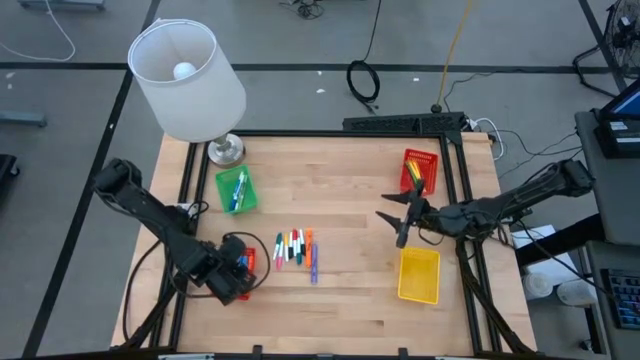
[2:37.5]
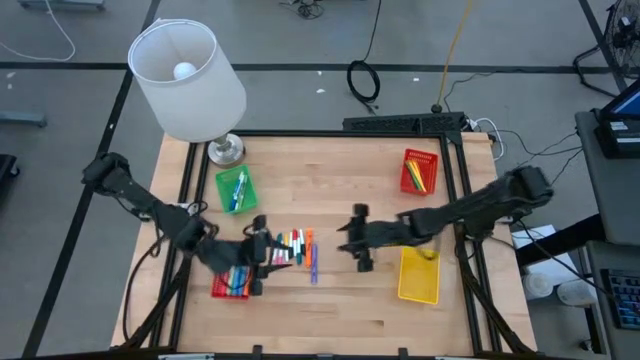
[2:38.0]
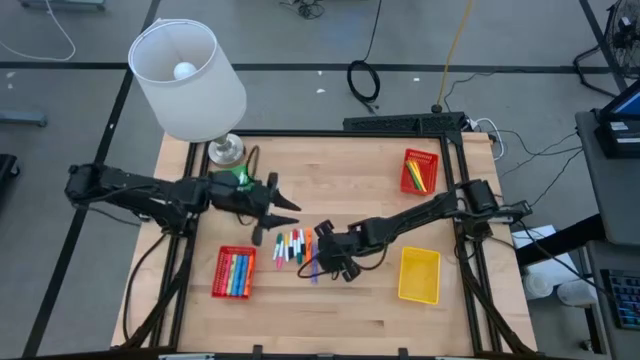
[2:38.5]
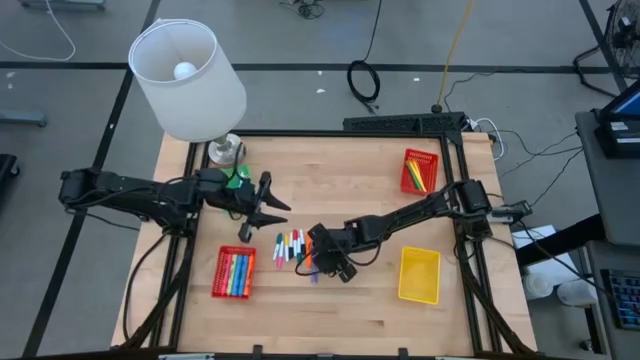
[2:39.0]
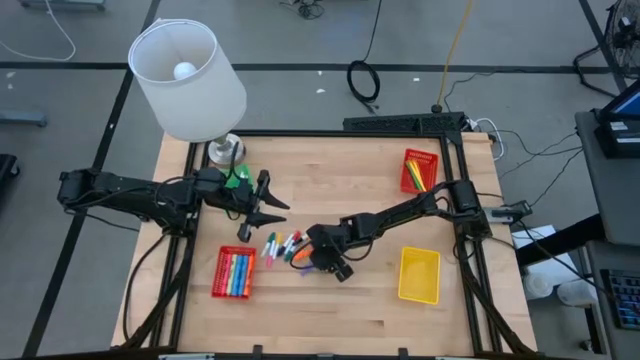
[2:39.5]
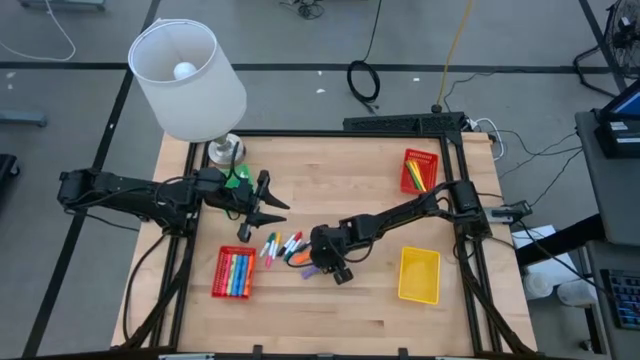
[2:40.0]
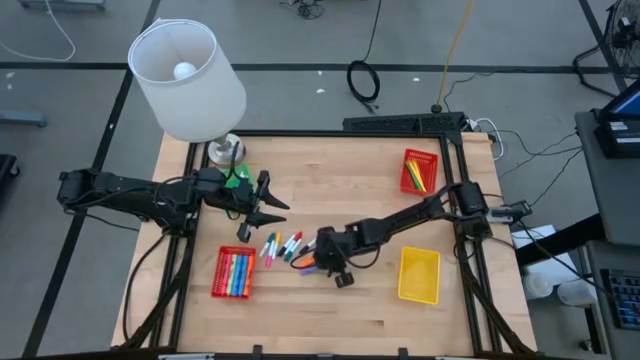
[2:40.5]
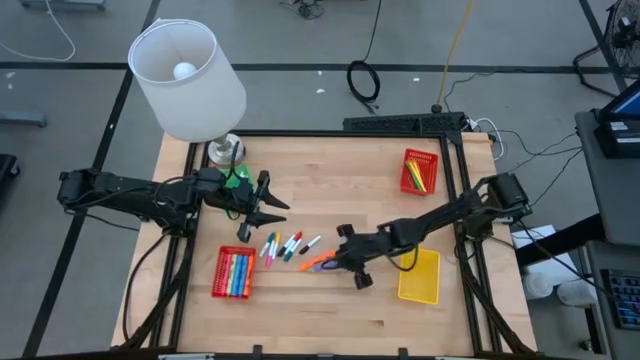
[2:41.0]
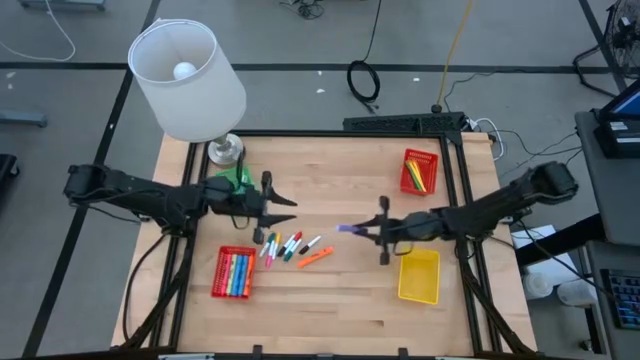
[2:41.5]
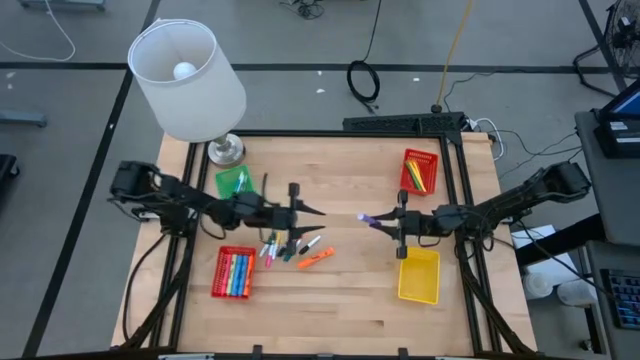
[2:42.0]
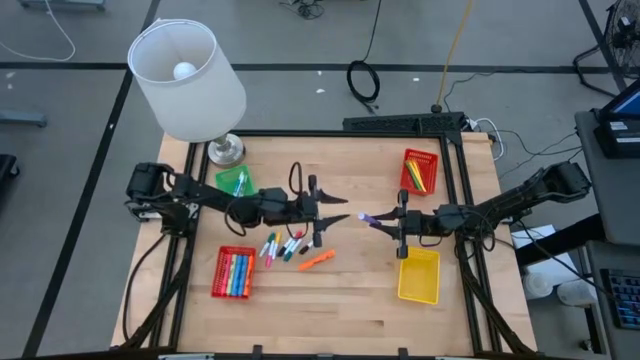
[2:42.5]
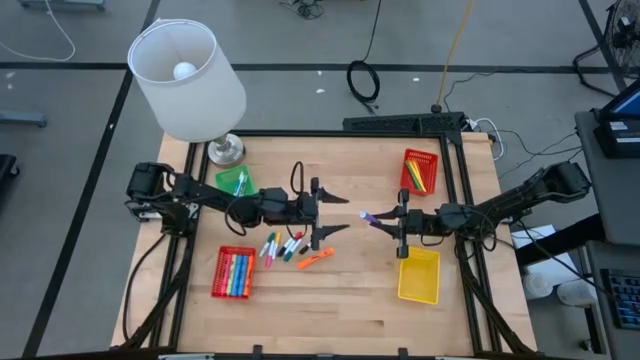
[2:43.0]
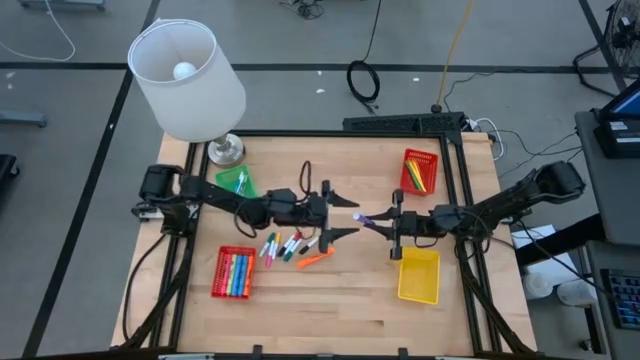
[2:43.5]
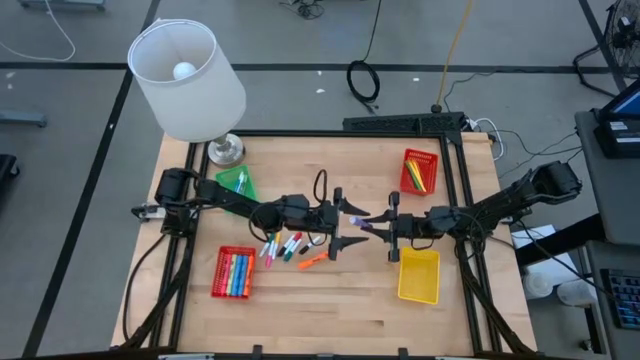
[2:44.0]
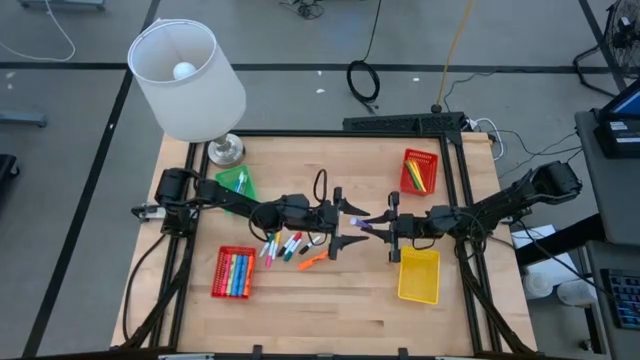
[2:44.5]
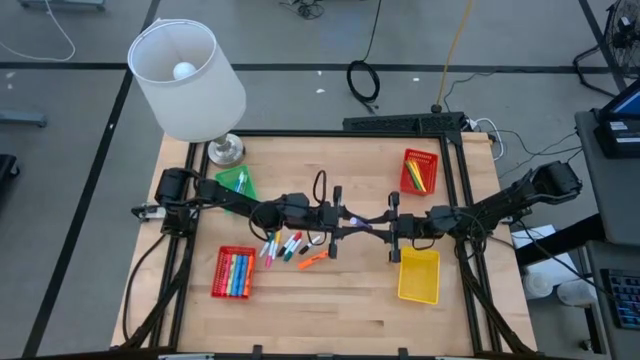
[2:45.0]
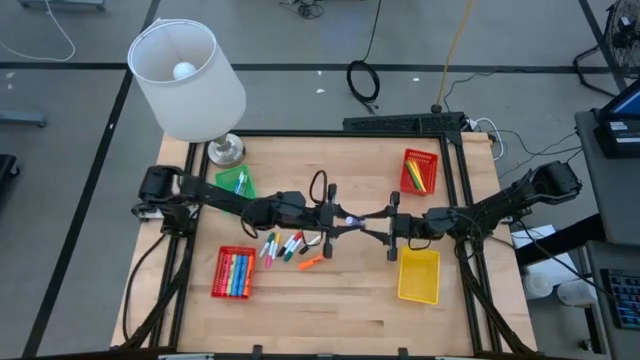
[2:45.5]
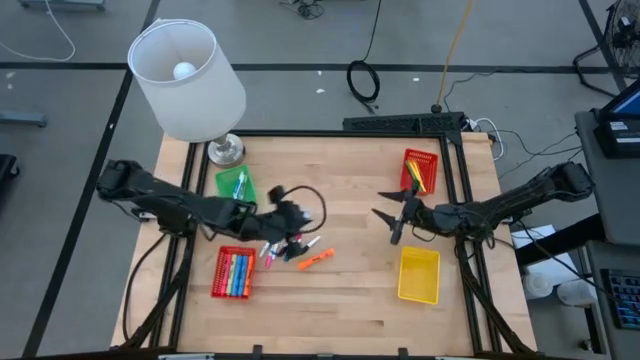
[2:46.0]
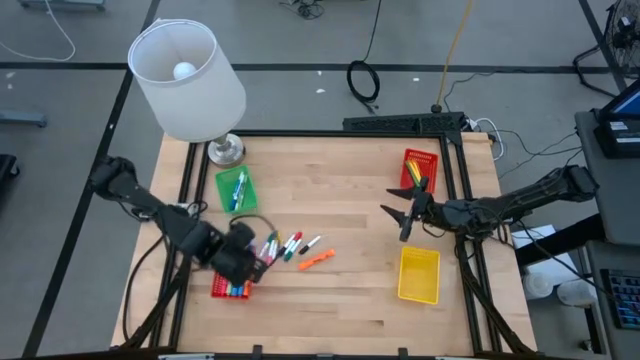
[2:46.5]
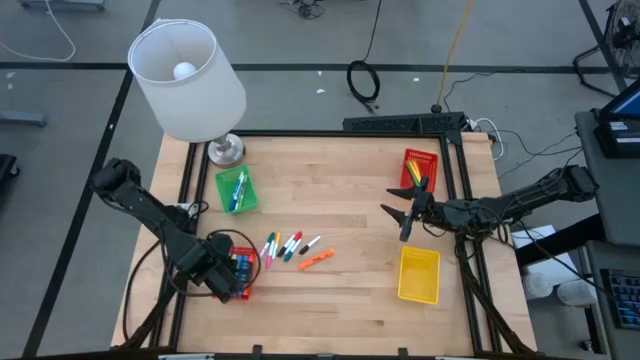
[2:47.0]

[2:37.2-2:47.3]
Task: Pick & Place Markers
Put the purple highlighter pen into the bottom red basket

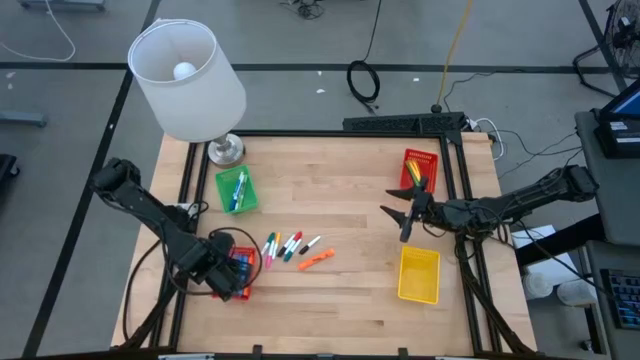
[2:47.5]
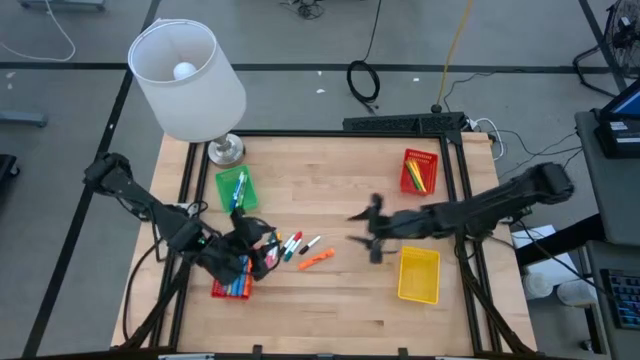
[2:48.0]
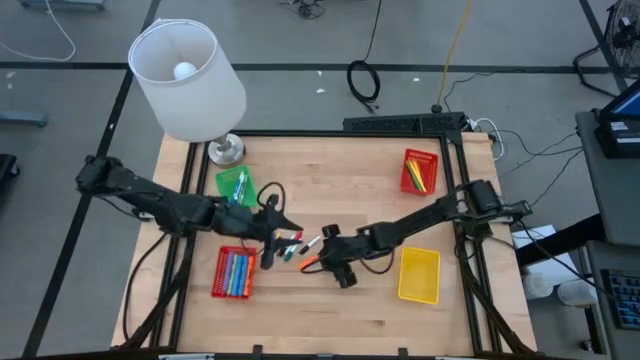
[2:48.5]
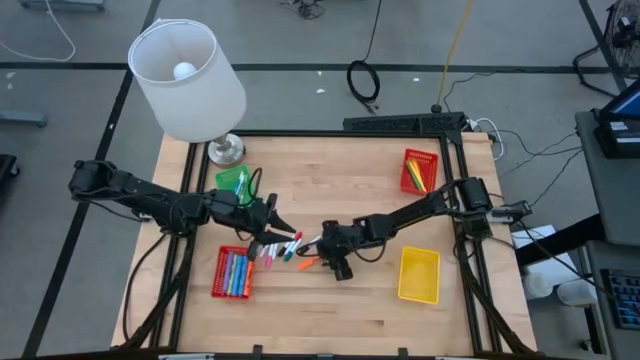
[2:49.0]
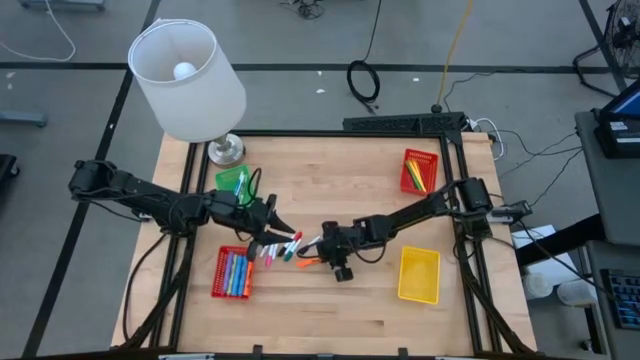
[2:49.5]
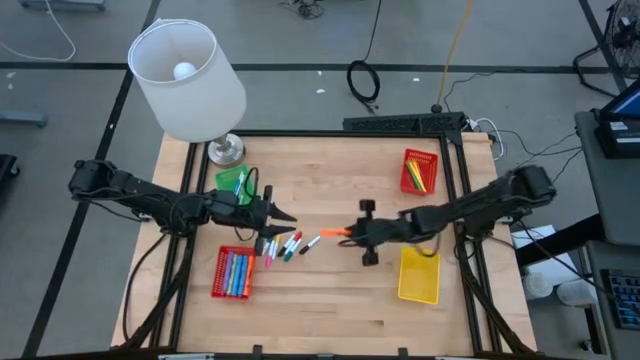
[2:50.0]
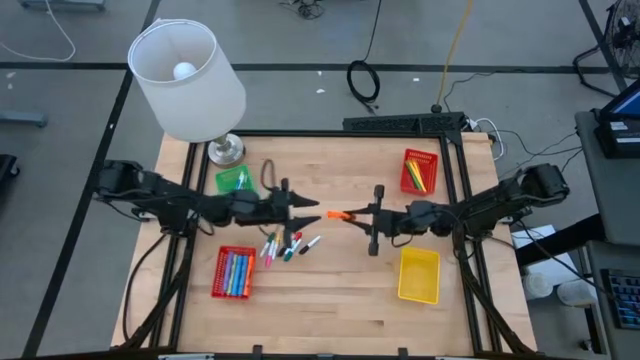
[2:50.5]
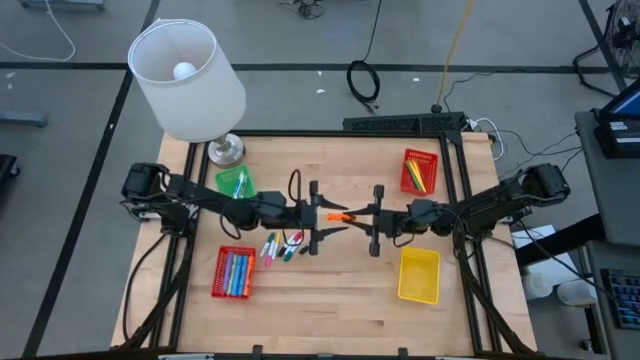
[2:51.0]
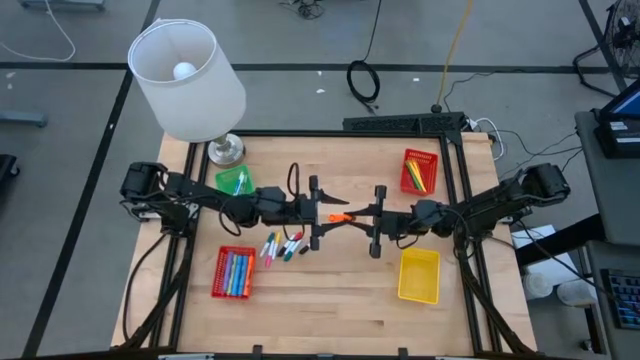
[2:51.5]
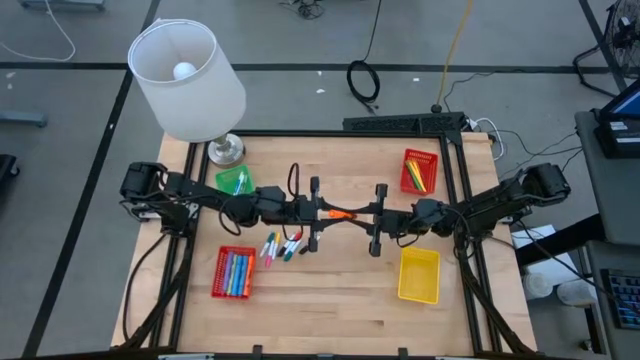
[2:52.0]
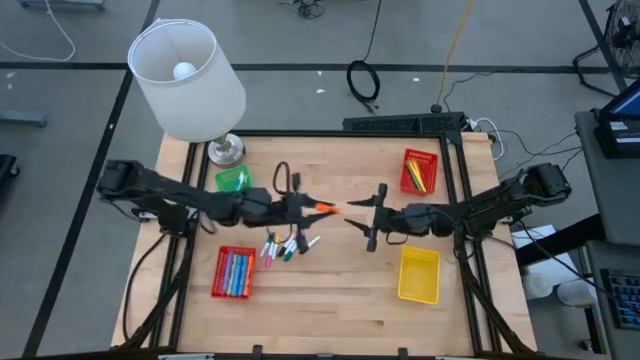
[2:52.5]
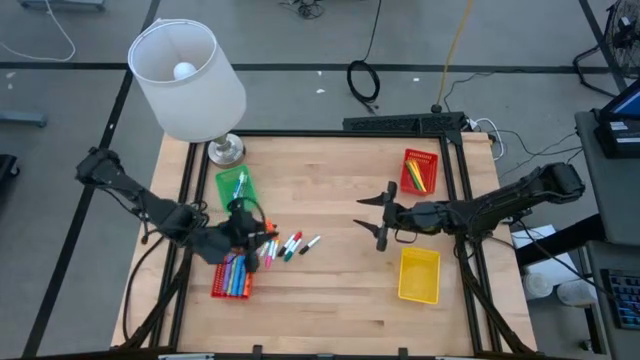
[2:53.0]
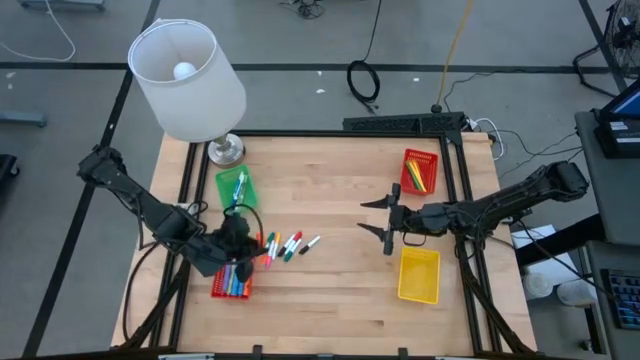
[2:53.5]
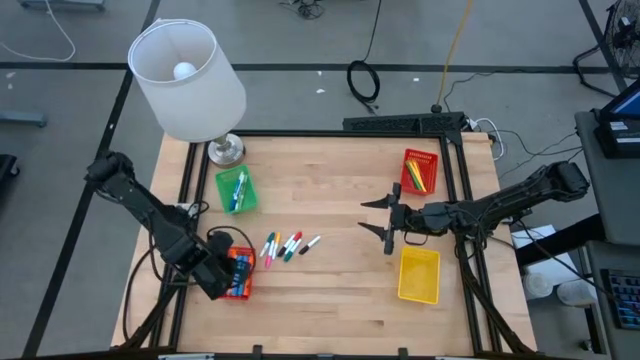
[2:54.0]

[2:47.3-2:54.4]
Put the orange highlighter pen into the bottom red basket

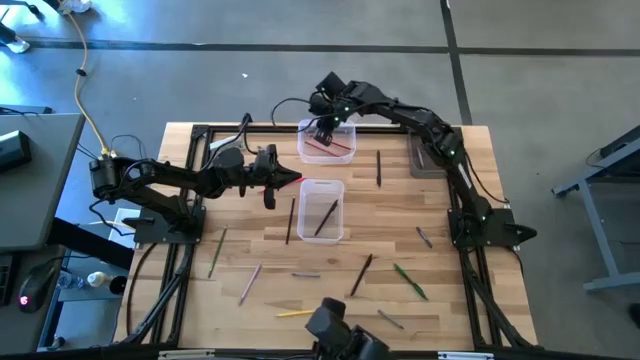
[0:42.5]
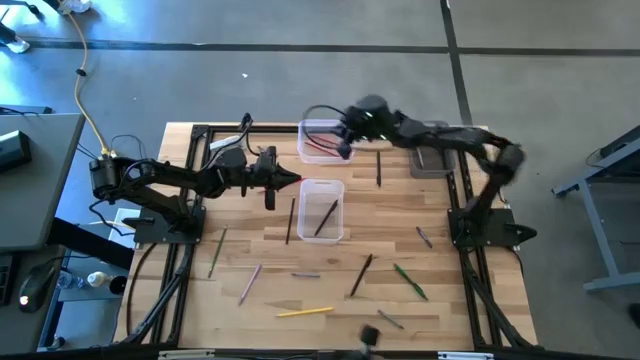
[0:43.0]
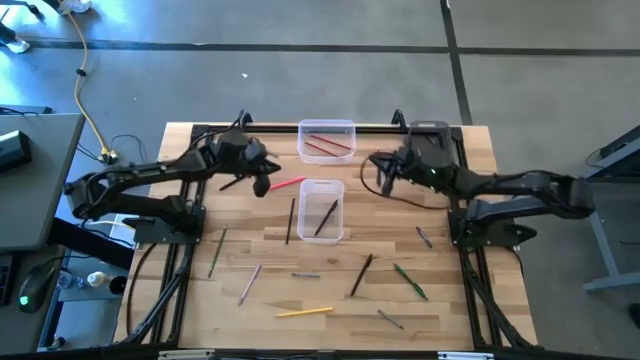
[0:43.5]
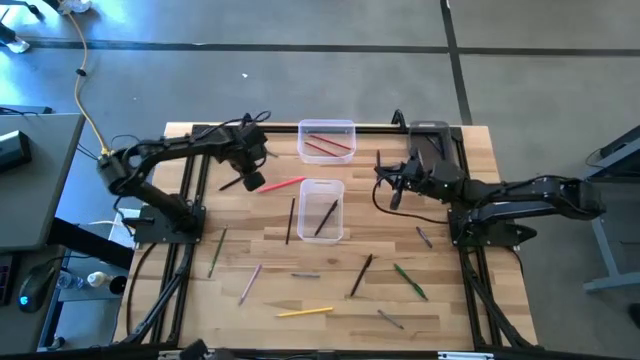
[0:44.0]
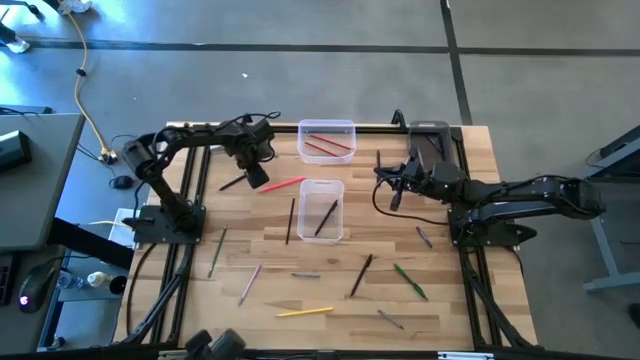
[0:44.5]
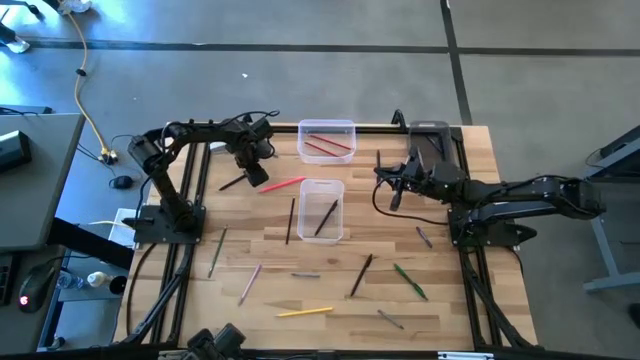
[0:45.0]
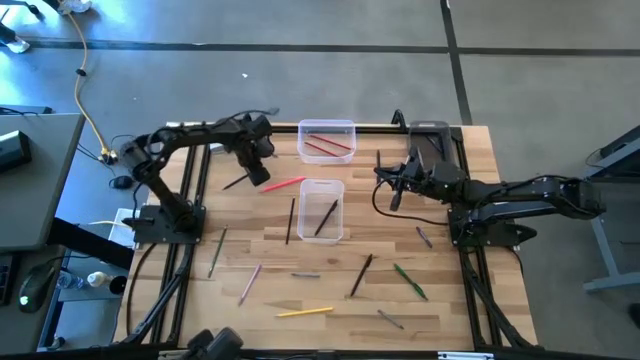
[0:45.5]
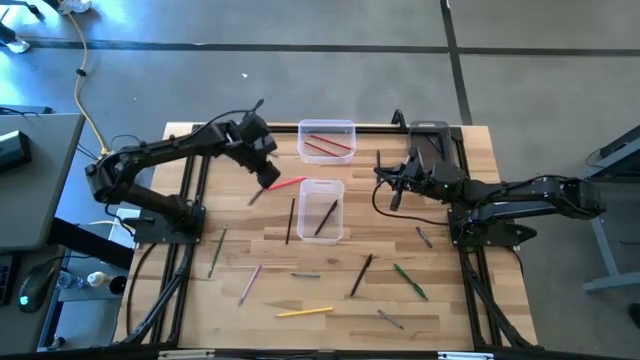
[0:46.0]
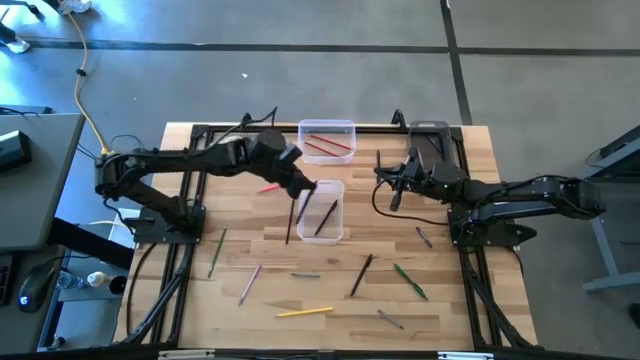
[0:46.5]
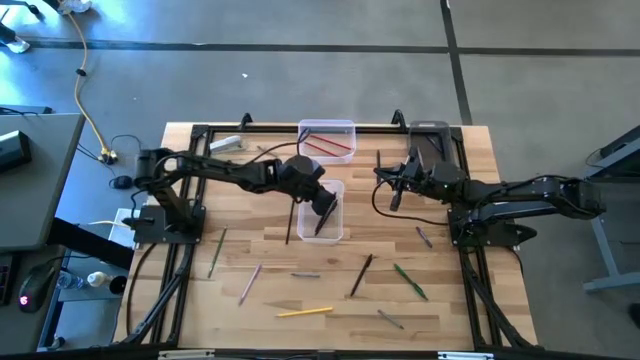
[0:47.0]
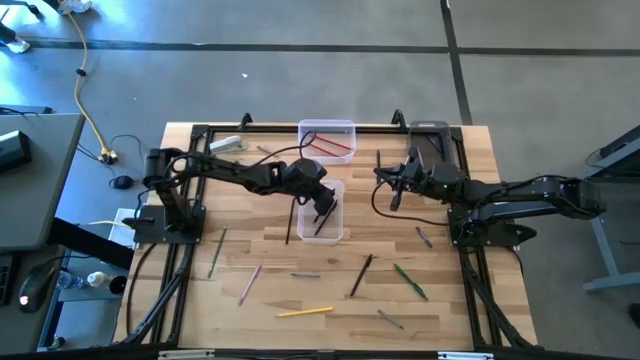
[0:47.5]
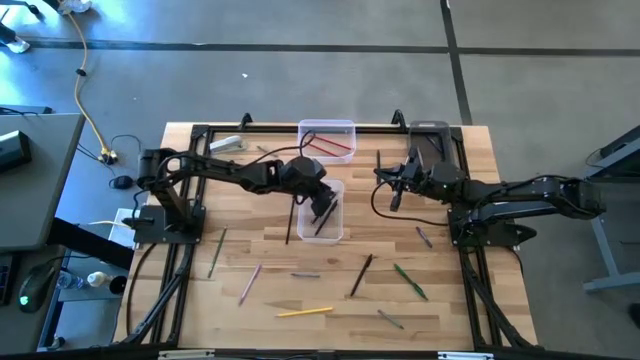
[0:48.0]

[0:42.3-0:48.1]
Task: Sort crayons/erasers/pens/pencils in bins
Put the top left black pen into the bottom transparent bin
